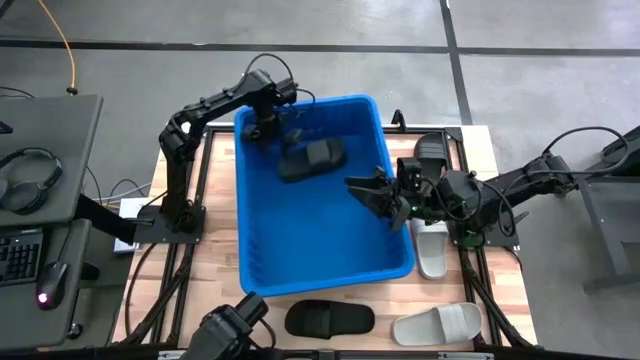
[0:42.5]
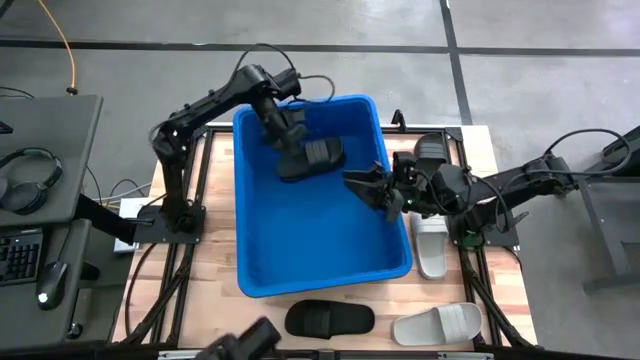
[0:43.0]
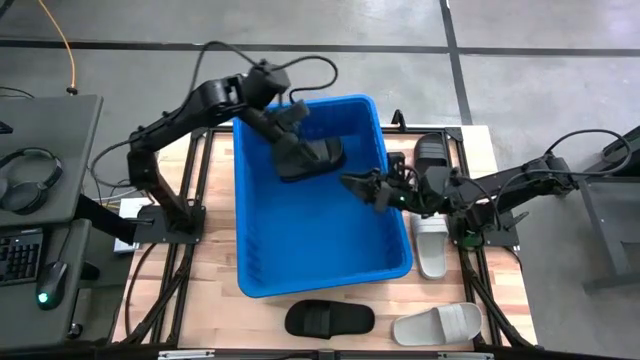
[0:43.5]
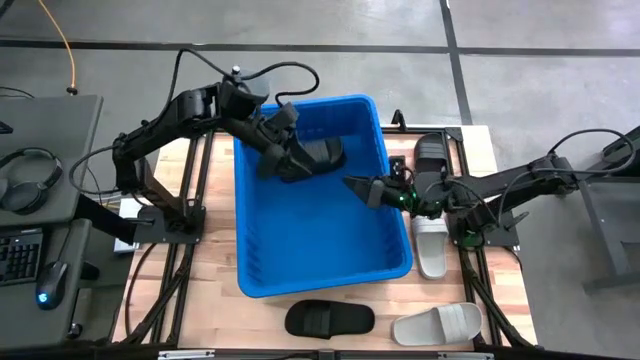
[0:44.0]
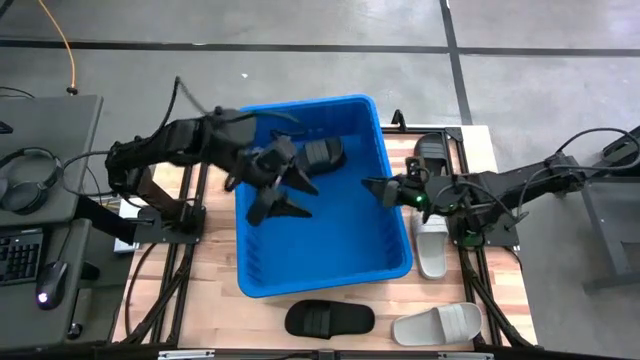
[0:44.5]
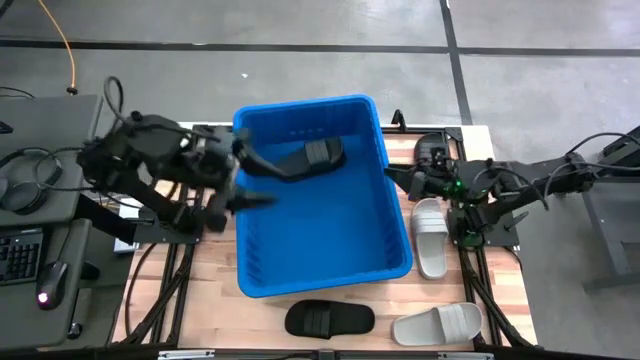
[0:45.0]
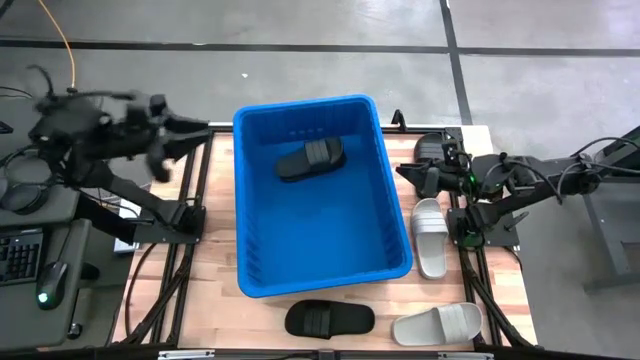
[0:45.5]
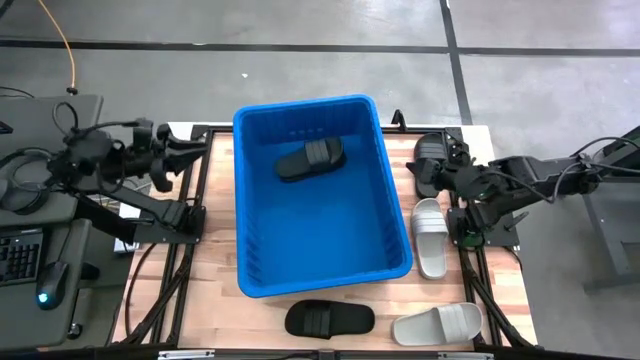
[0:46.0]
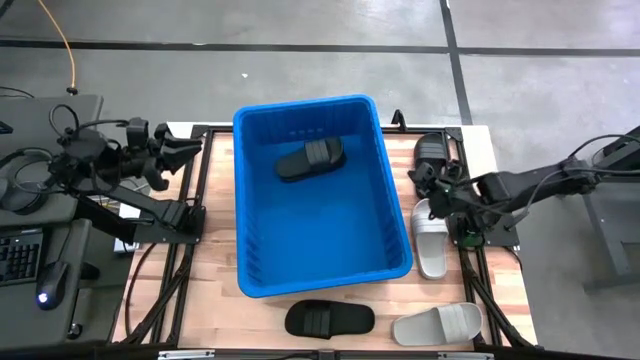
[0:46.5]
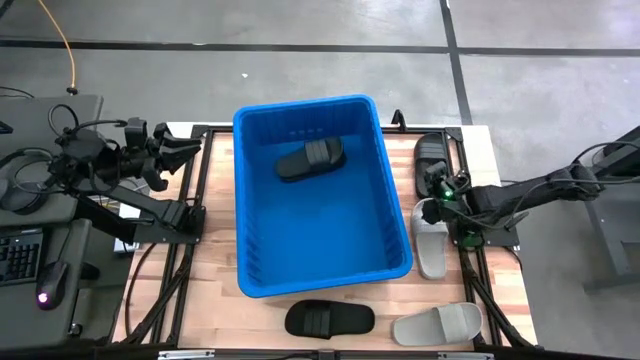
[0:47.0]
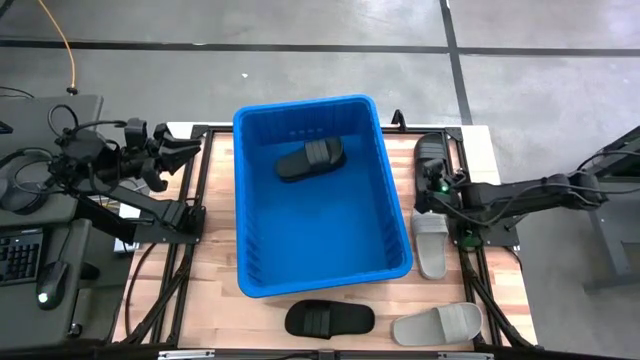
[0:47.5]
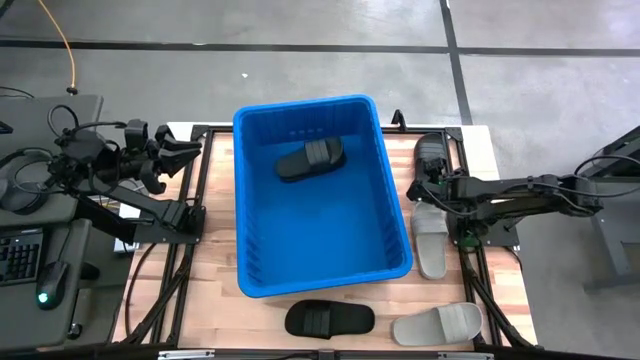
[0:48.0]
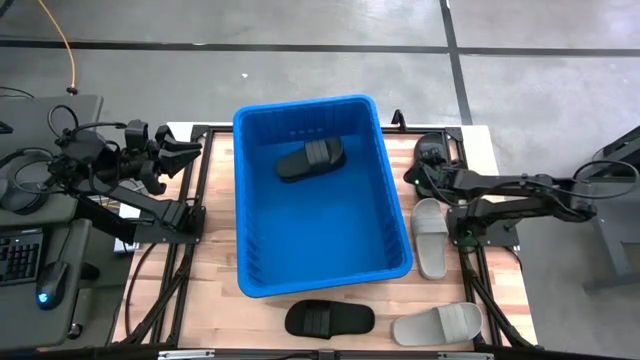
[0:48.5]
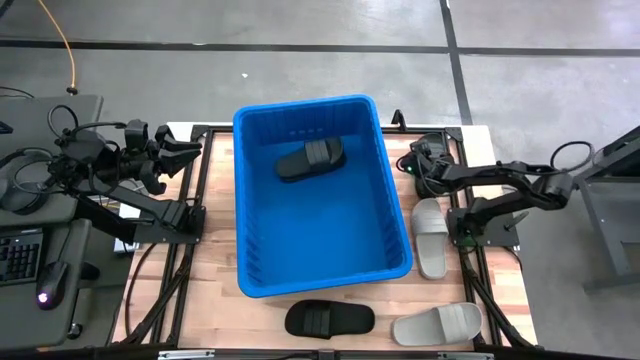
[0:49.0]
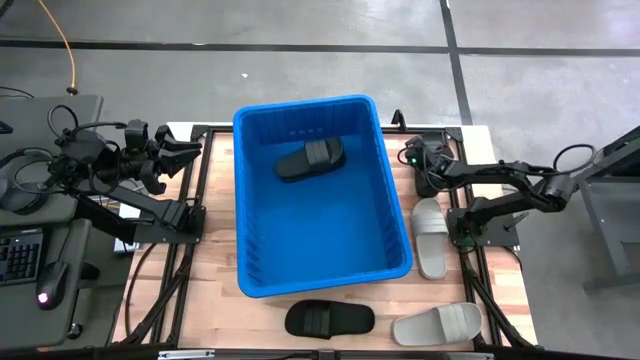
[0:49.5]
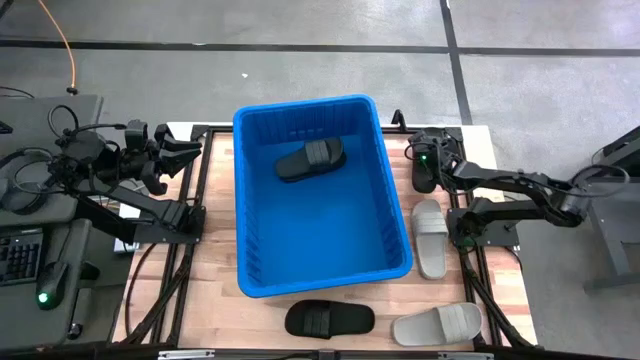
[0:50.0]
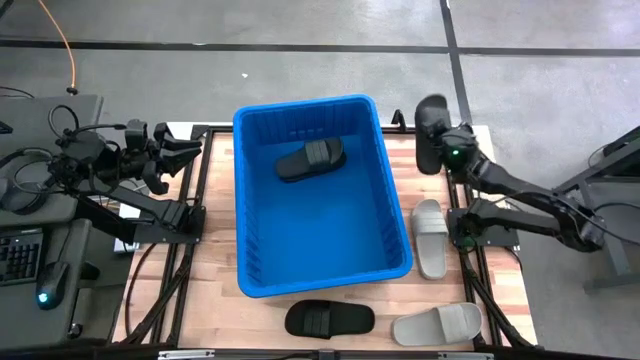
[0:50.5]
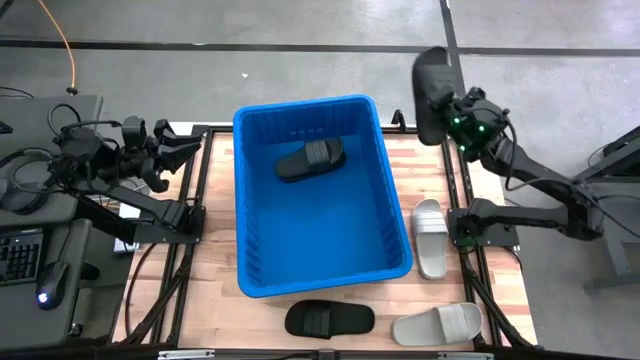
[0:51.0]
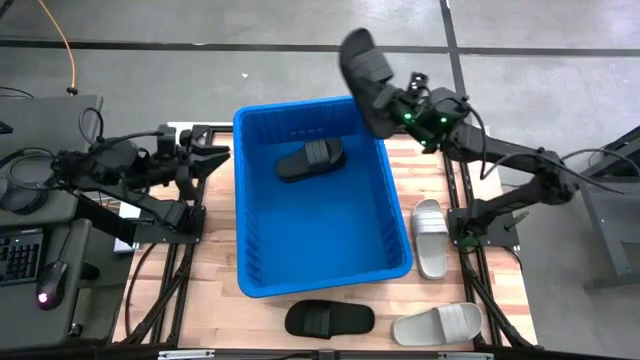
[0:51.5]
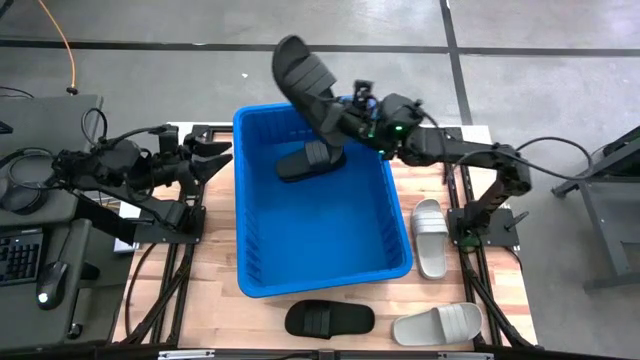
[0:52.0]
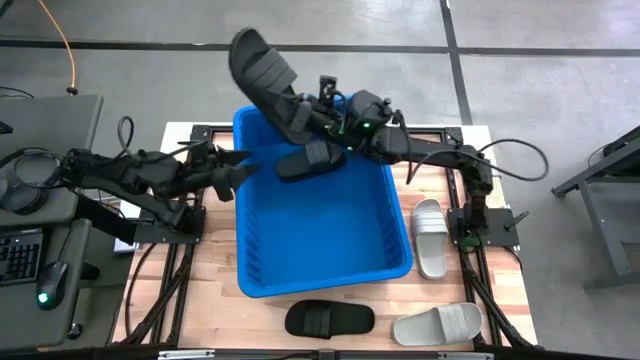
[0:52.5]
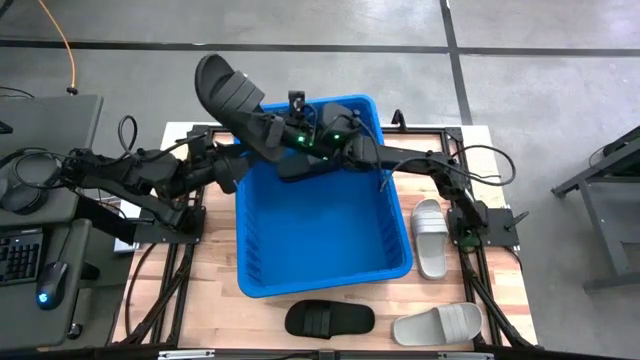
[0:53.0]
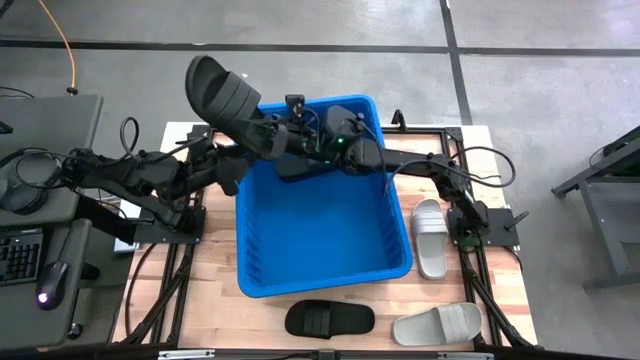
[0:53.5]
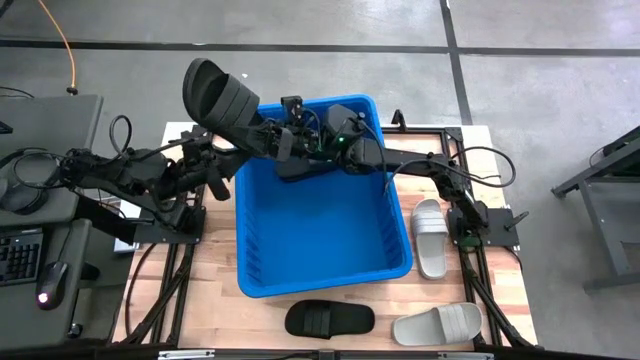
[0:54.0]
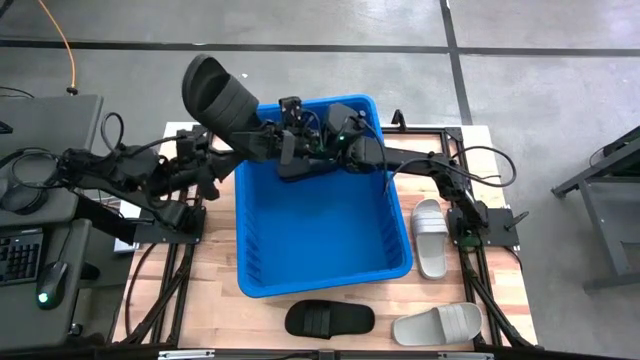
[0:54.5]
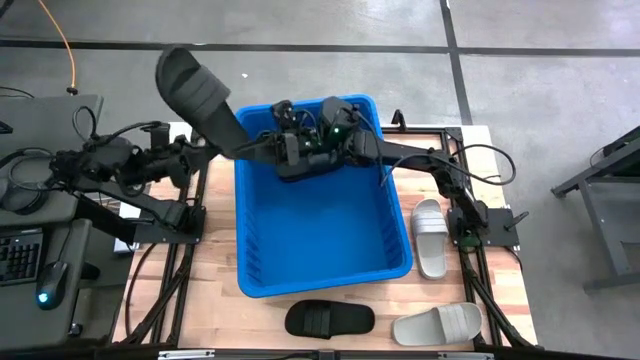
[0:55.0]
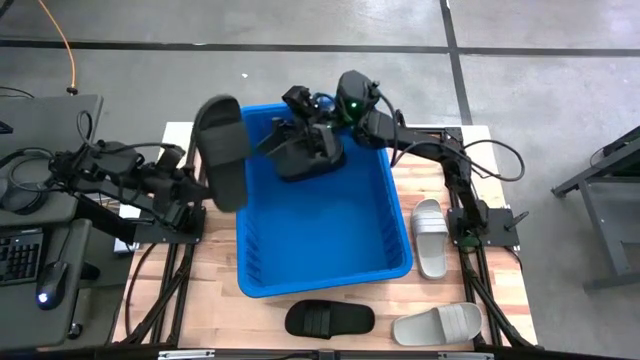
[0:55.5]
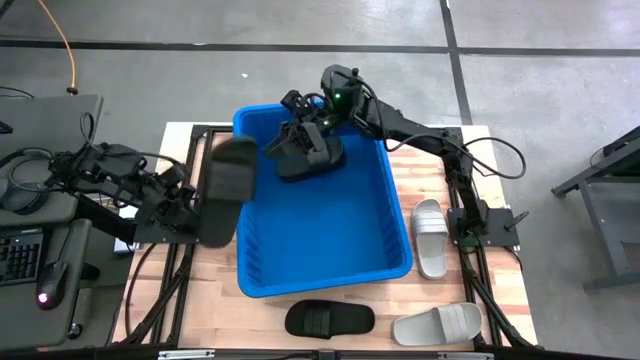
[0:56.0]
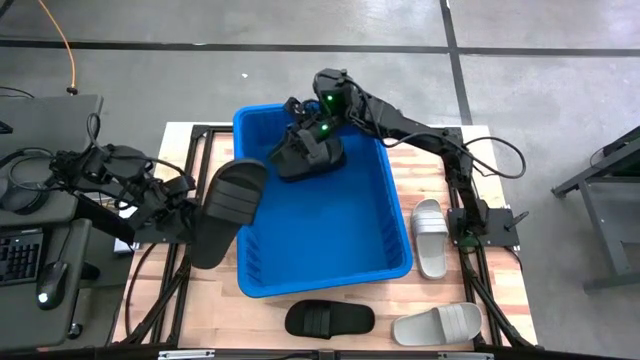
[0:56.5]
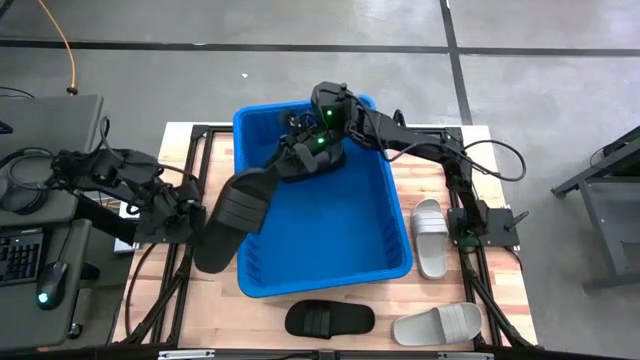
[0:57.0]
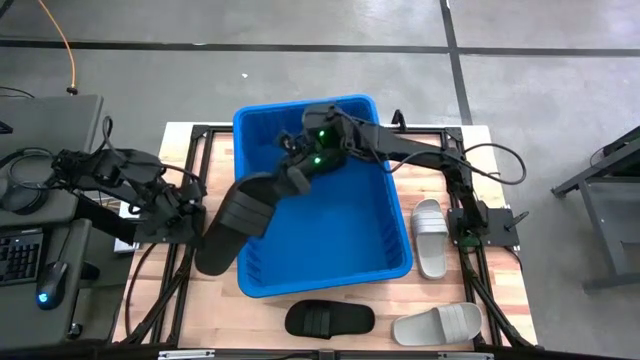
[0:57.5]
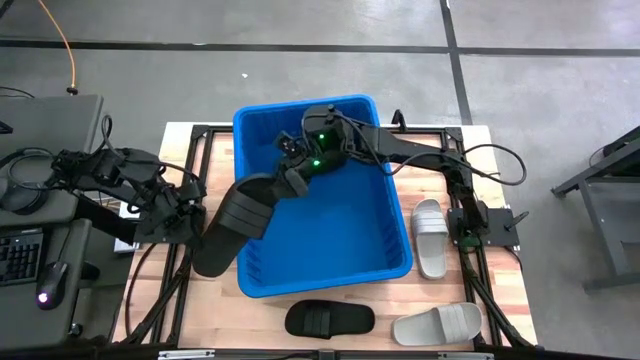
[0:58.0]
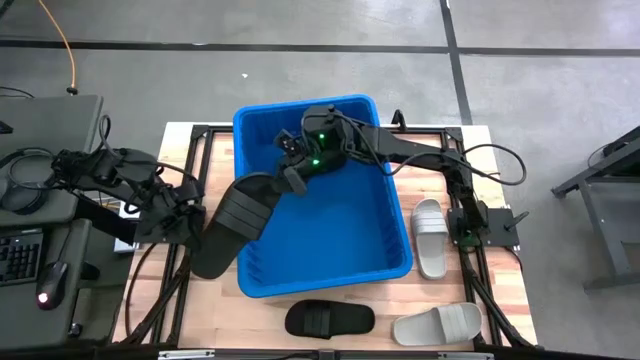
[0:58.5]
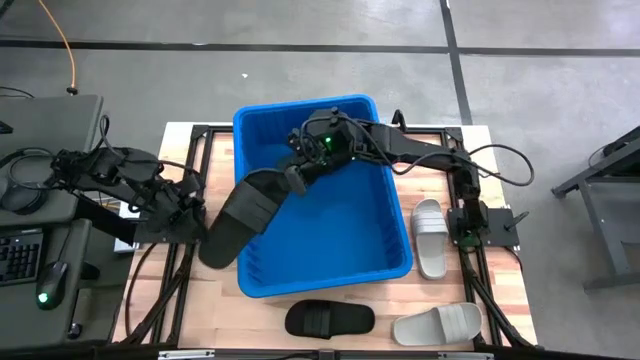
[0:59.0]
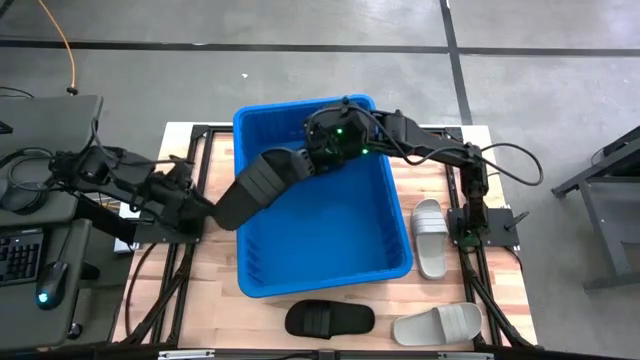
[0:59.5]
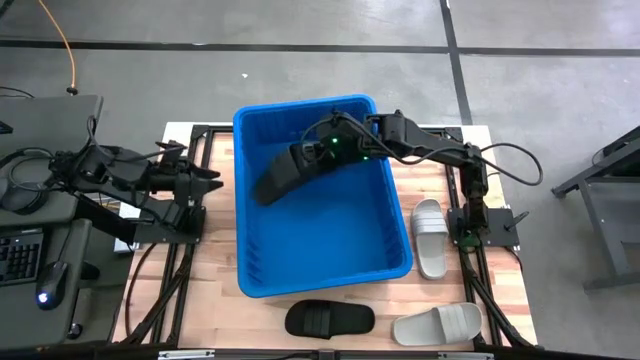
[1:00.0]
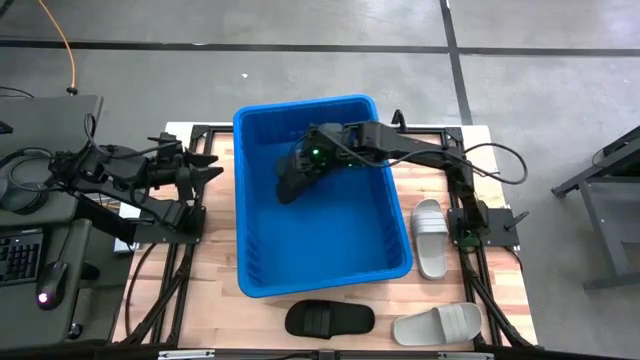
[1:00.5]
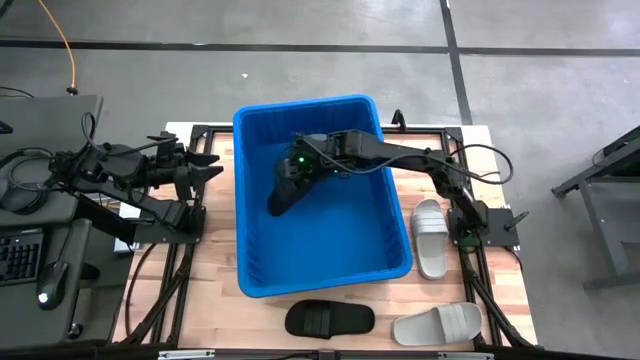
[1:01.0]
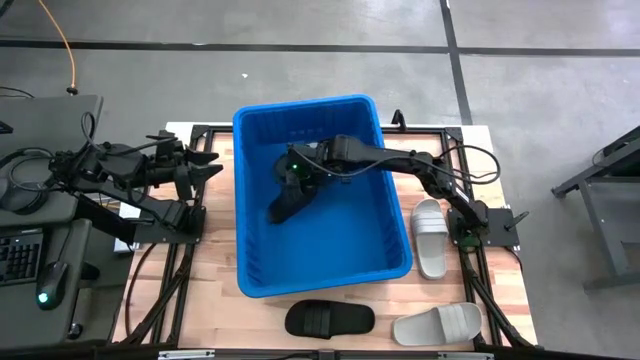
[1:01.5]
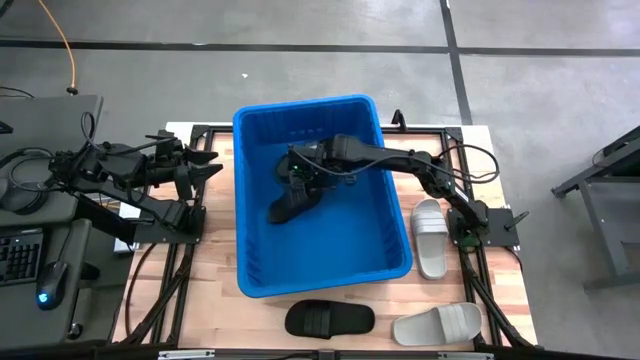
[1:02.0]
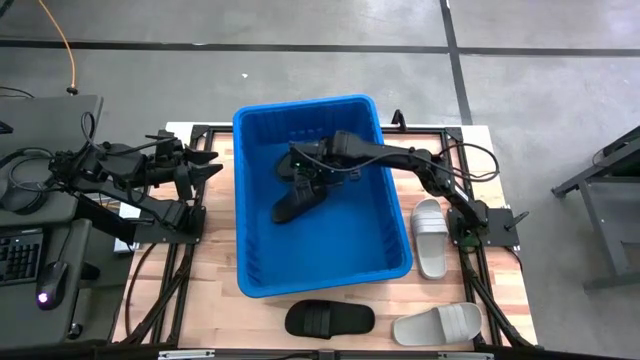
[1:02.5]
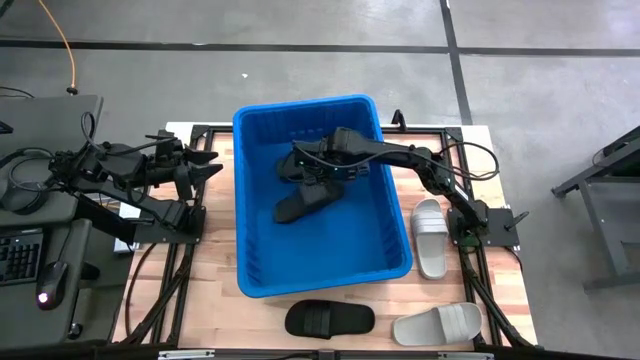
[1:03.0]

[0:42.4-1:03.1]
Task: Pick and place slides into bin
Put the black slide into the blue container
